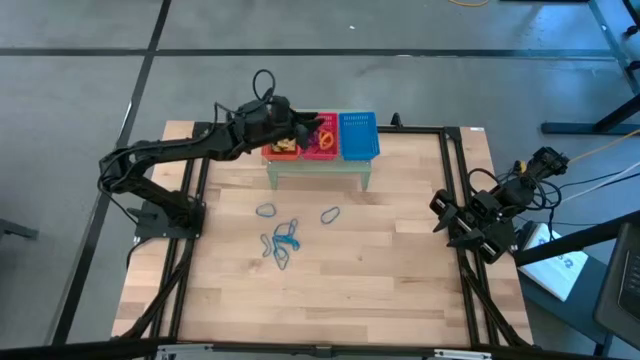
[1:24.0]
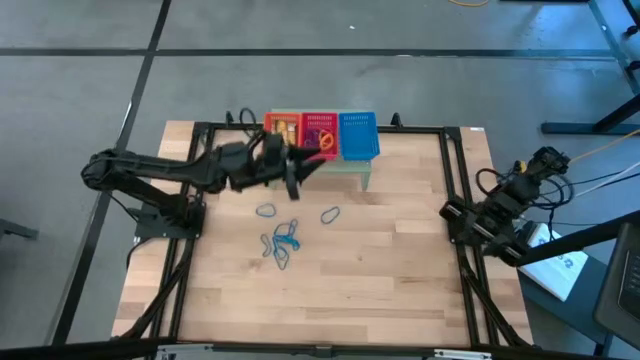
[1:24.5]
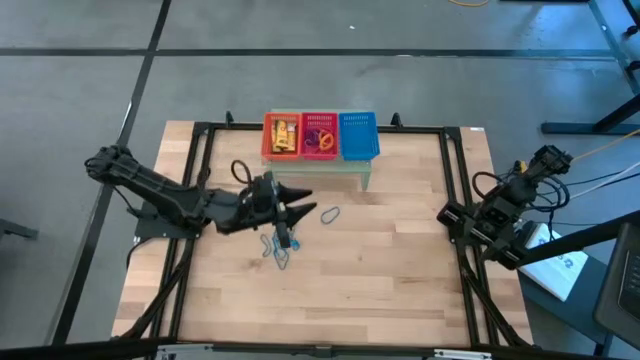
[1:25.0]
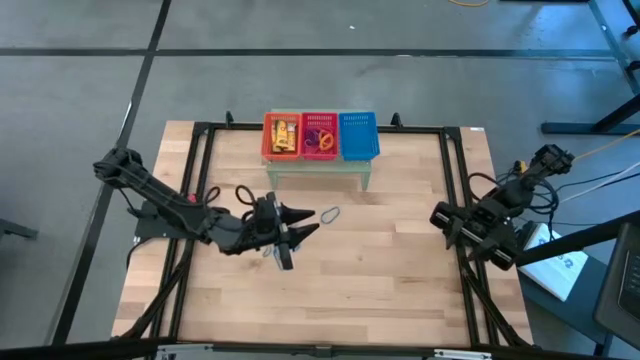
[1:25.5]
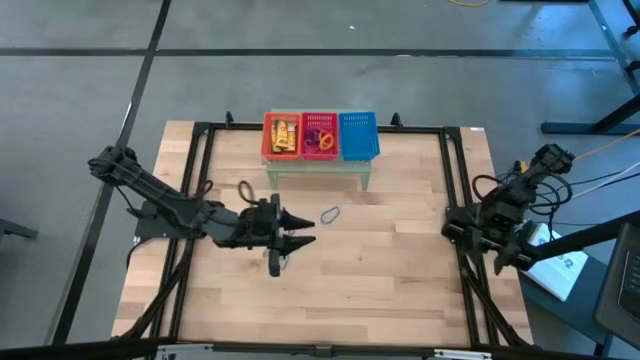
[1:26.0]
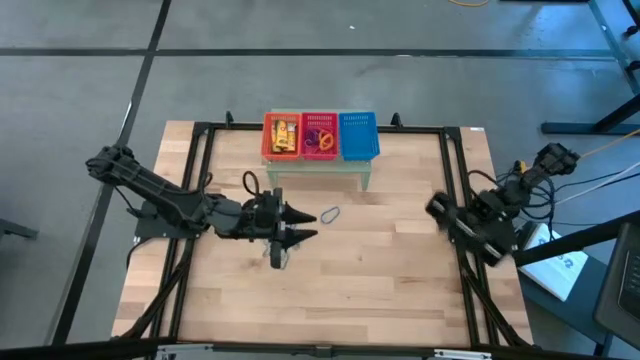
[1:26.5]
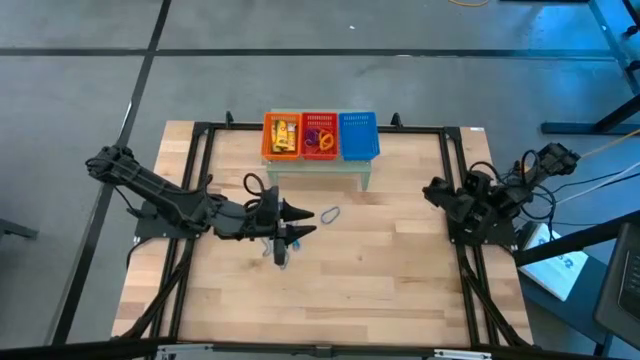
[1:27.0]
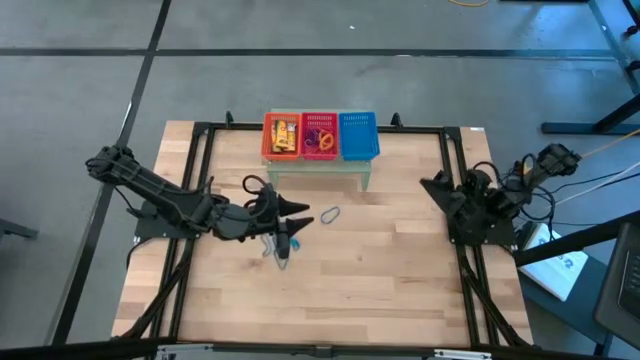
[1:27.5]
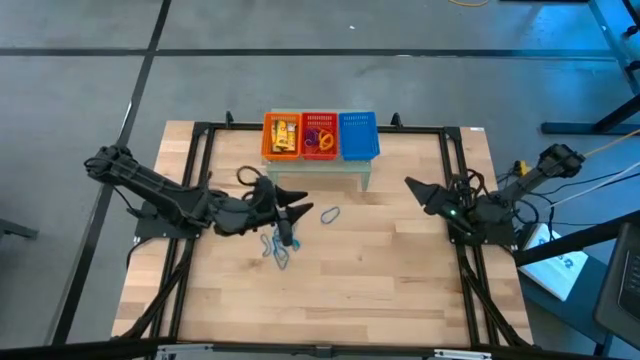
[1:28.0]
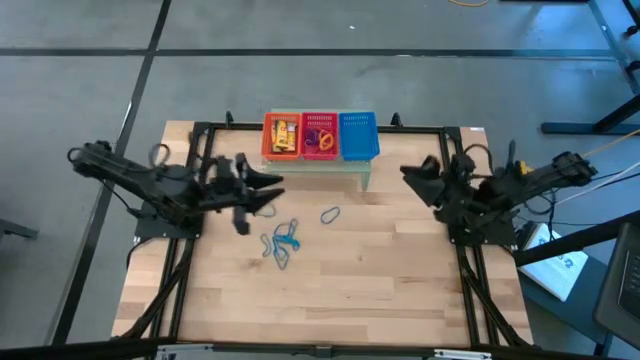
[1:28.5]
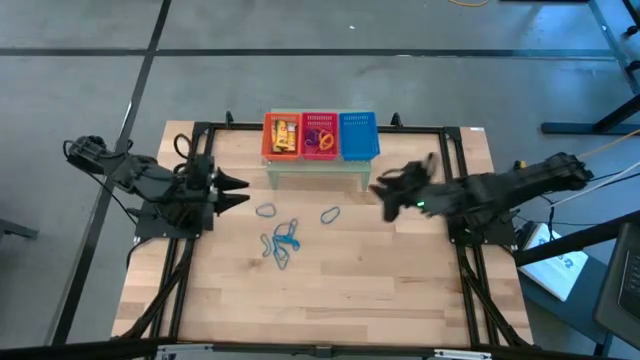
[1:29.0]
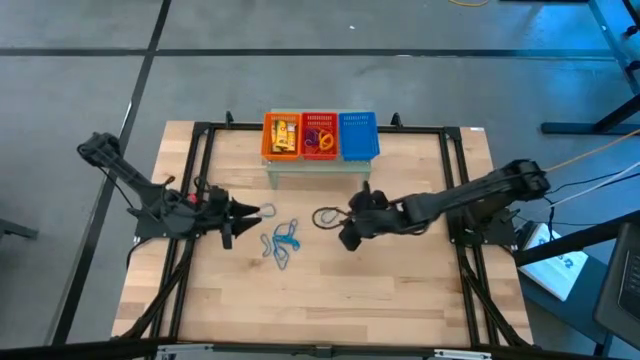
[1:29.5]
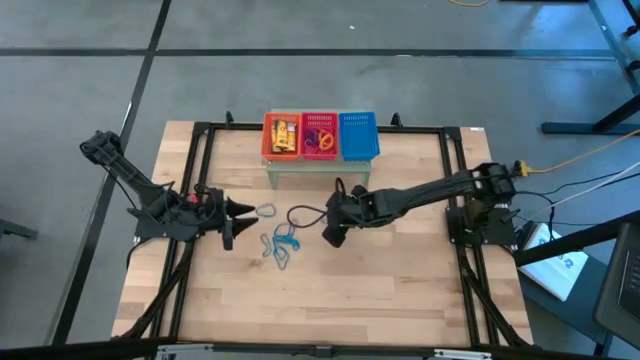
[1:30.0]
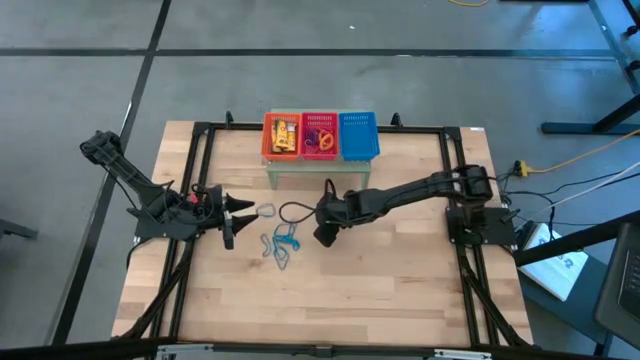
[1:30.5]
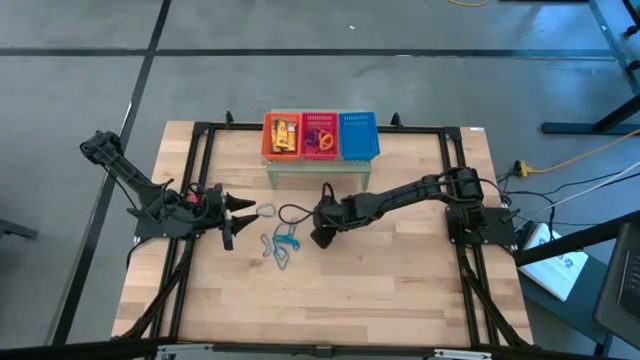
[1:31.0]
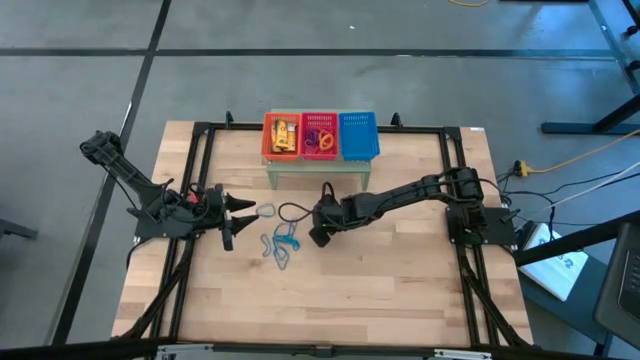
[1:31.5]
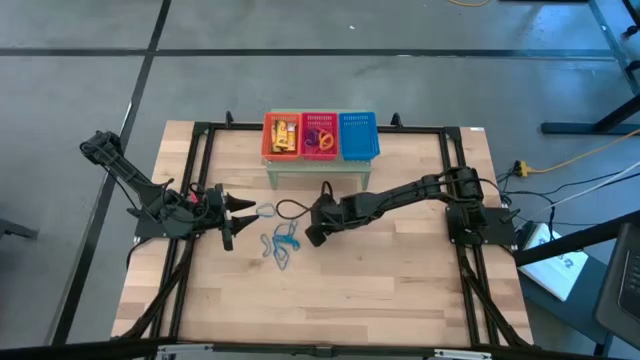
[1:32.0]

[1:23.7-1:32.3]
Task: Pick & Place Office Desk Supplies
Put the blue rubber band into the blue bin on the shelf

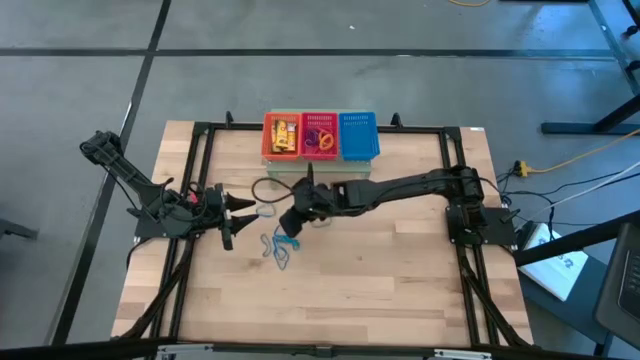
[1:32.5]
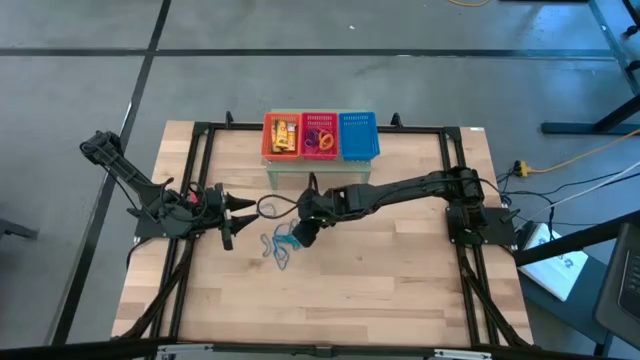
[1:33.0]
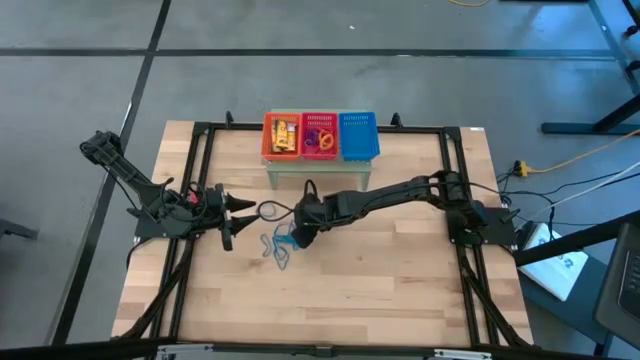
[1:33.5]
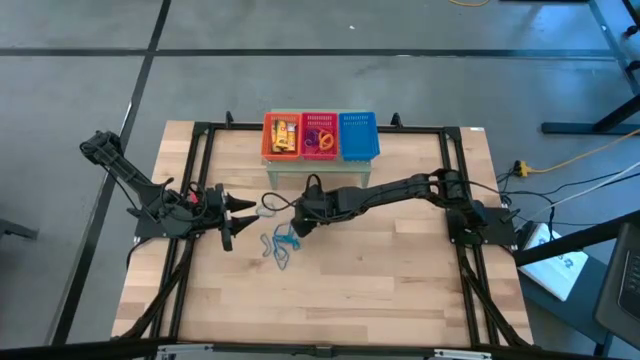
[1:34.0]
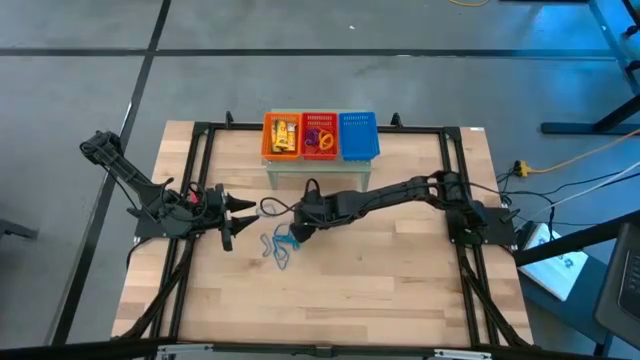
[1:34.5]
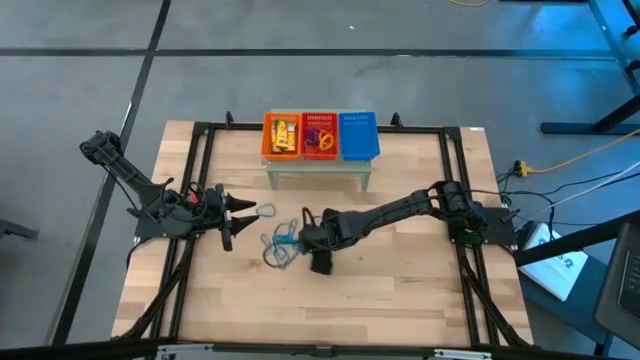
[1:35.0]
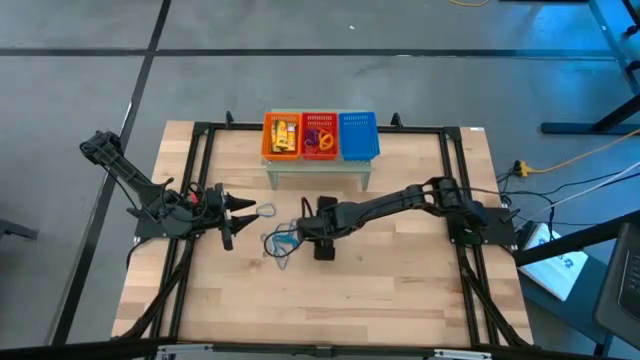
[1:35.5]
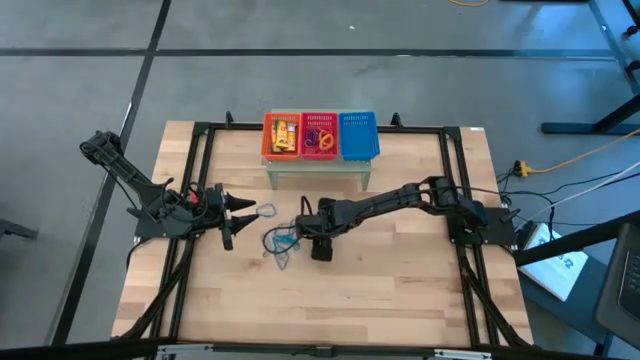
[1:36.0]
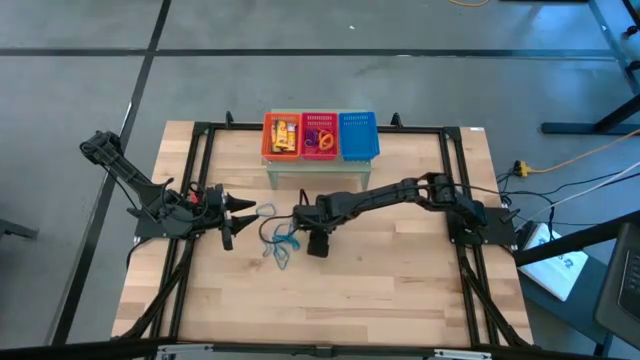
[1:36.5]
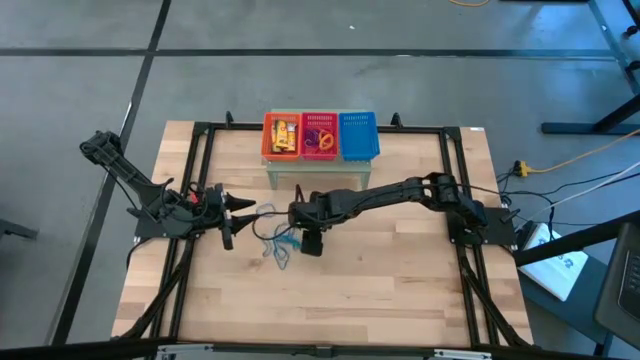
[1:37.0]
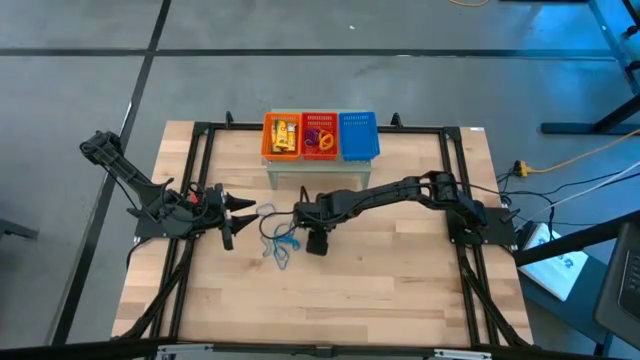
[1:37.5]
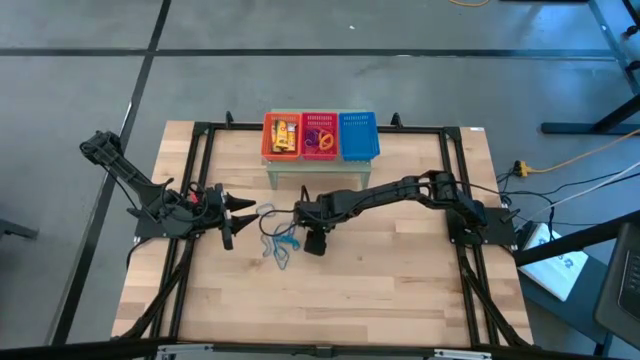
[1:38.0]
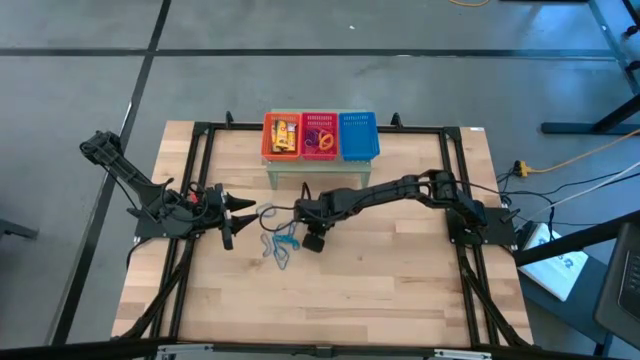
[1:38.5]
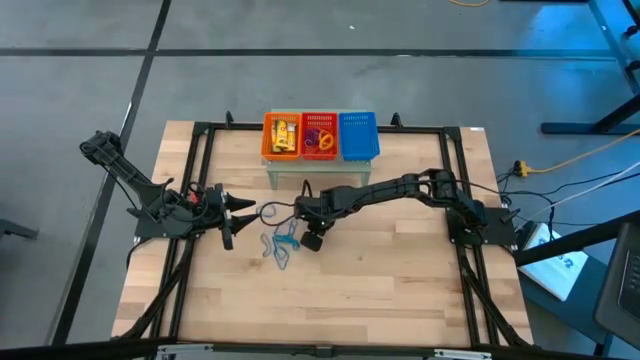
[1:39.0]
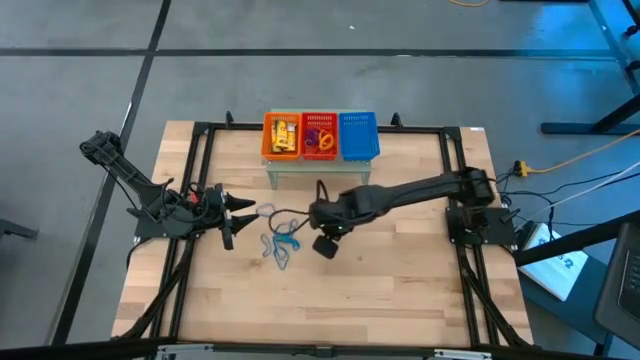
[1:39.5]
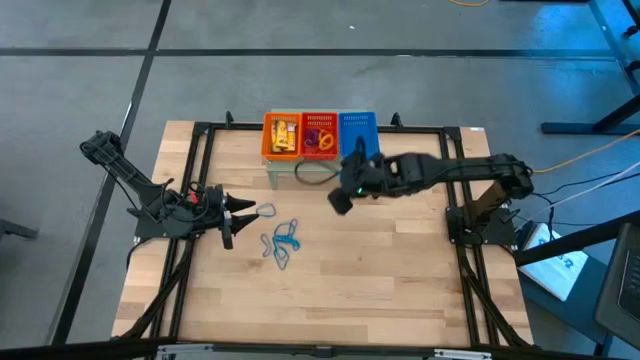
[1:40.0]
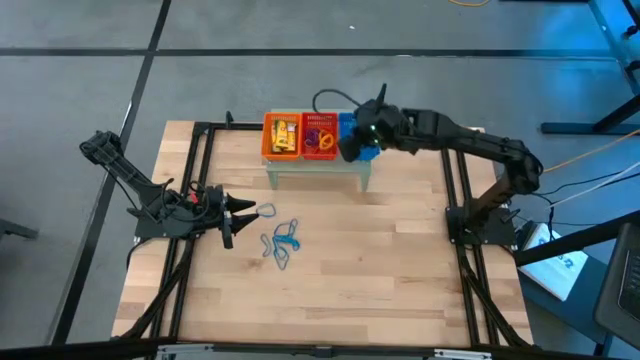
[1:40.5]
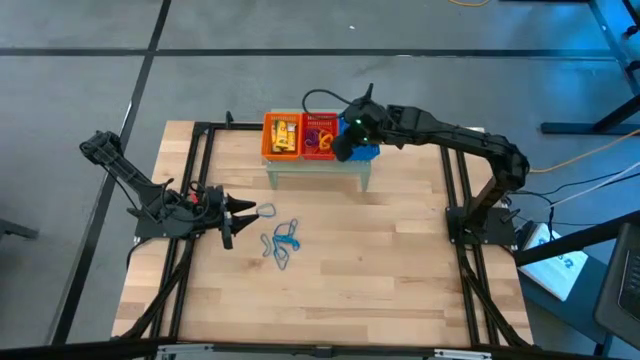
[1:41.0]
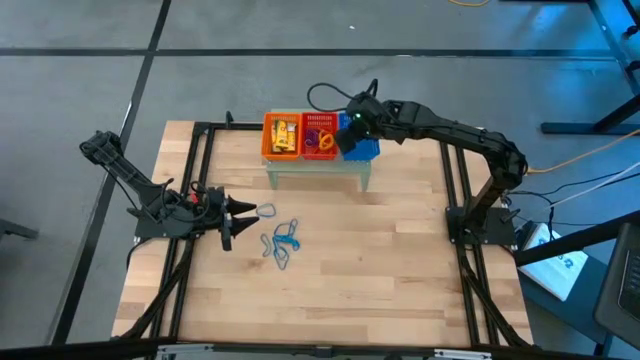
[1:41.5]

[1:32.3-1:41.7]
Put the blue rubber band into the blue bin on the shelf

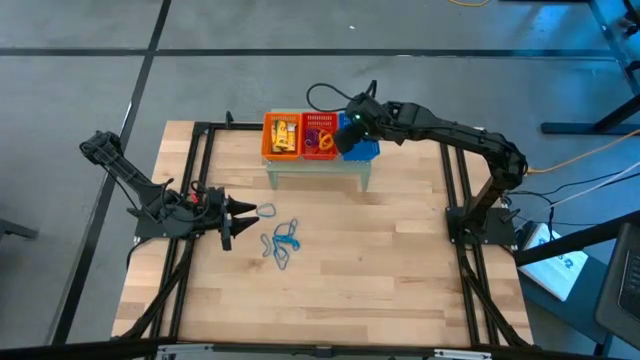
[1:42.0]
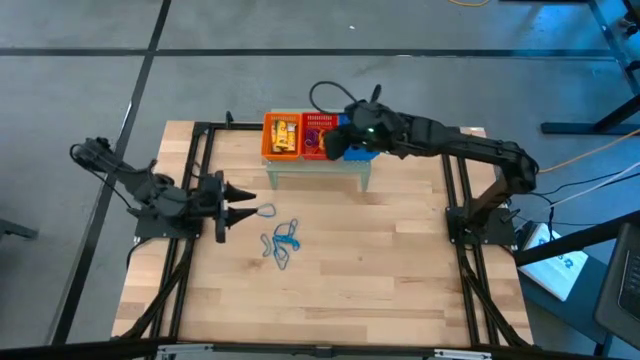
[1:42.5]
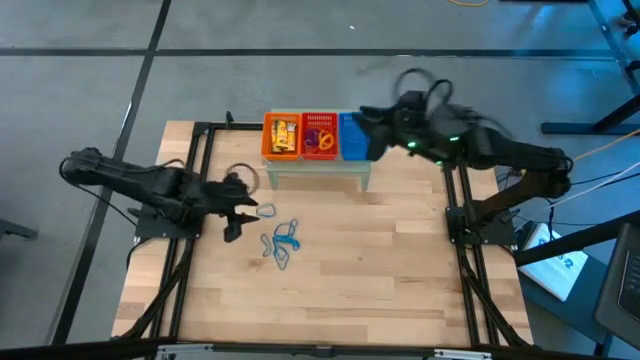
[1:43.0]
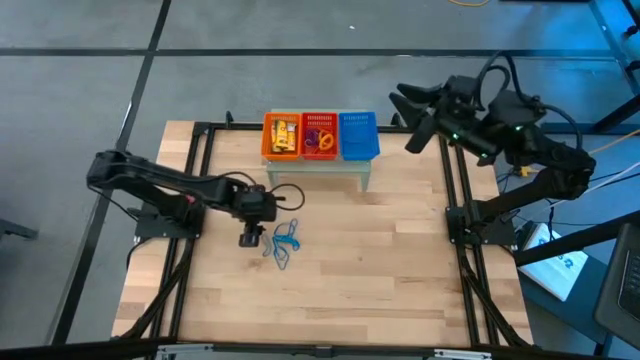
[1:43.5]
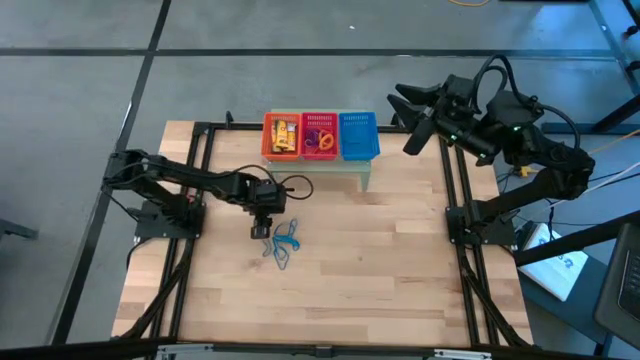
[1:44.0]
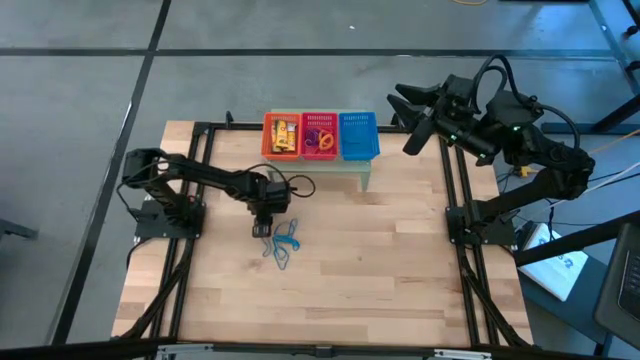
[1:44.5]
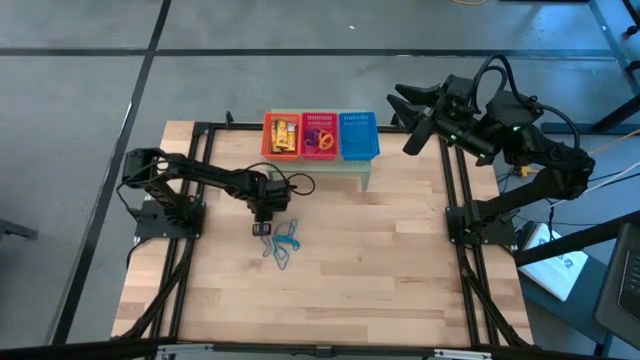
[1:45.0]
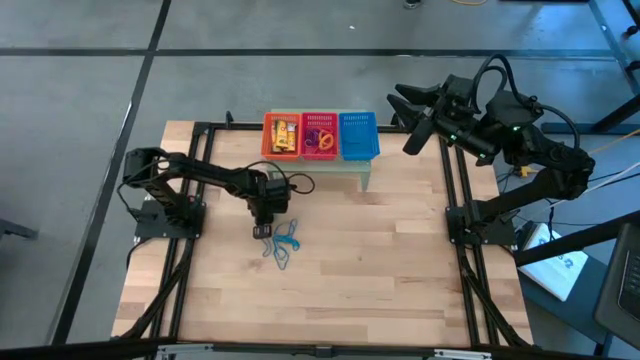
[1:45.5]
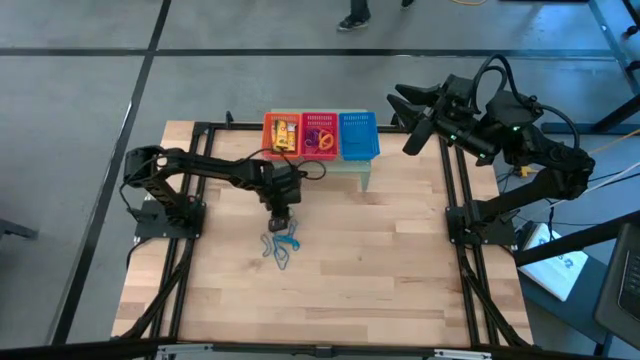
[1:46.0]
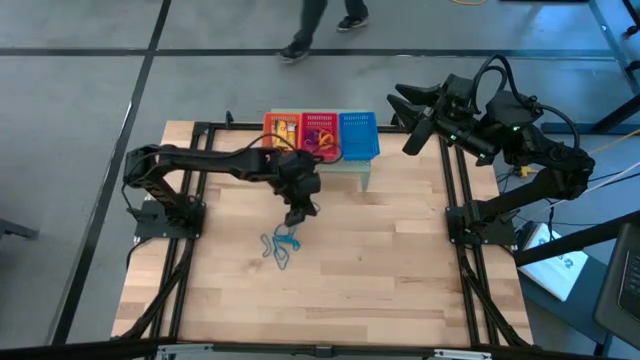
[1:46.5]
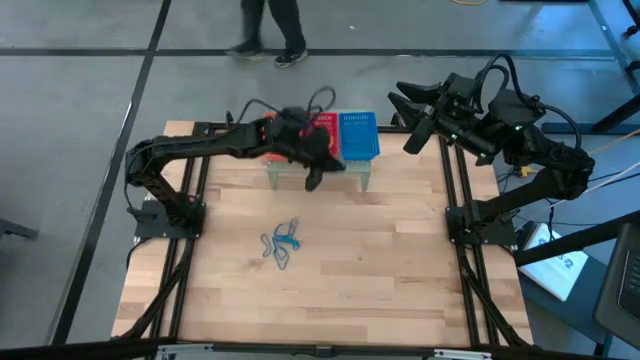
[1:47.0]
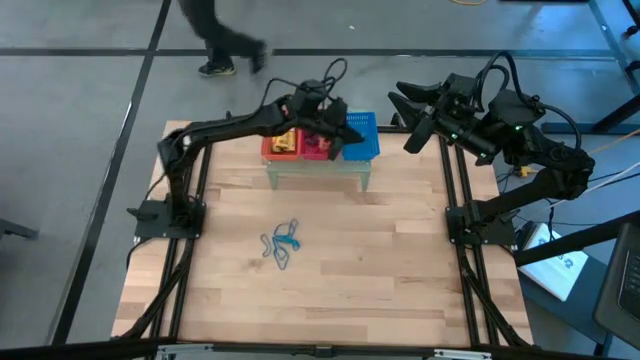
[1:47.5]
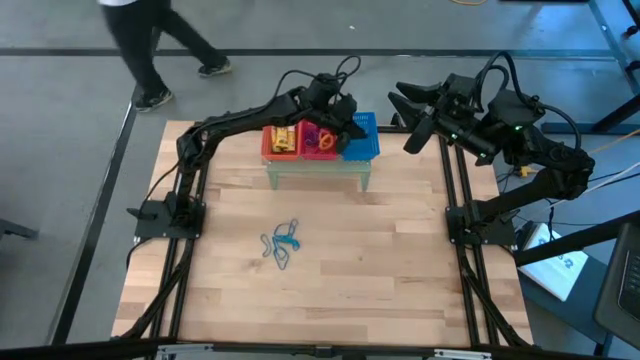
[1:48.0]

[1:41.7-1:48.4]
Put the blue rubber band into the blue bin on the shelf
